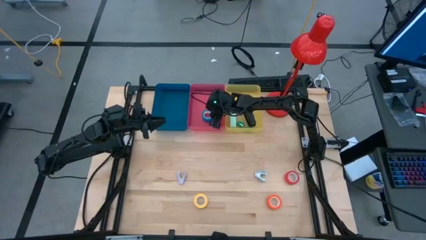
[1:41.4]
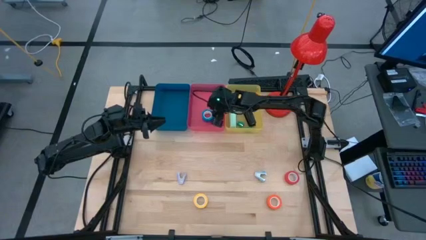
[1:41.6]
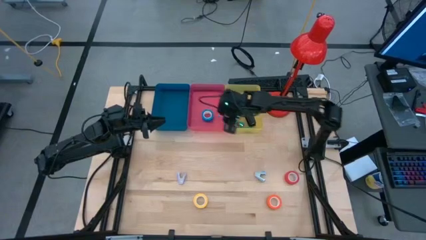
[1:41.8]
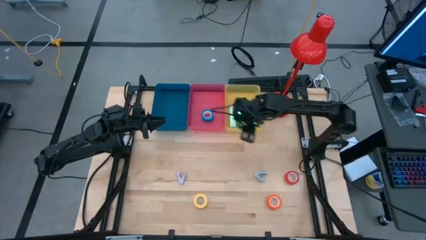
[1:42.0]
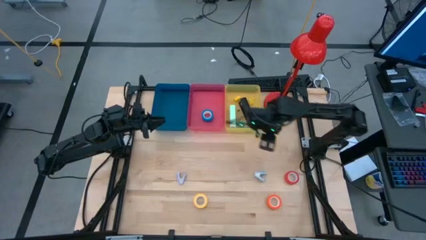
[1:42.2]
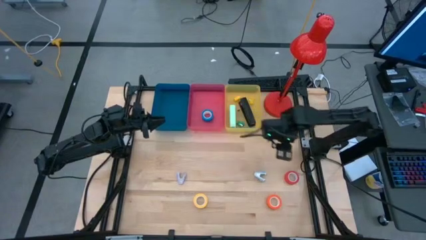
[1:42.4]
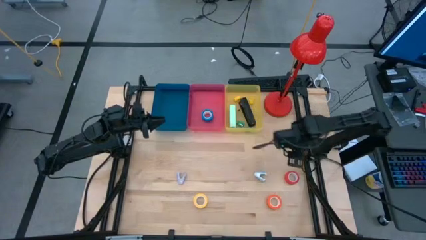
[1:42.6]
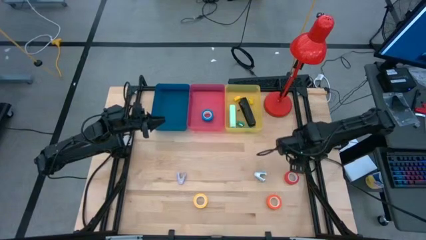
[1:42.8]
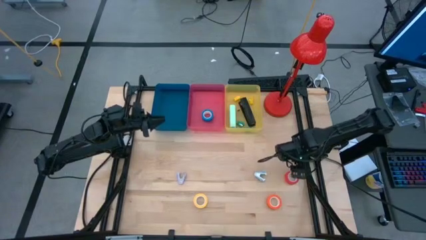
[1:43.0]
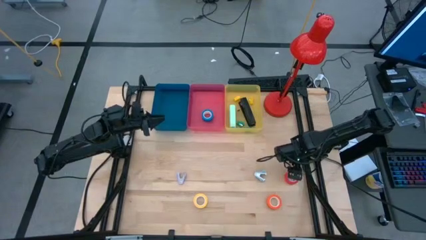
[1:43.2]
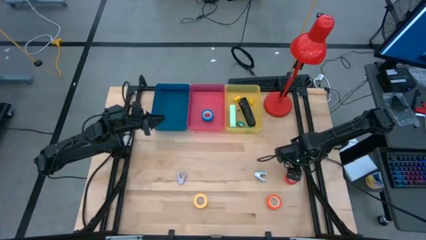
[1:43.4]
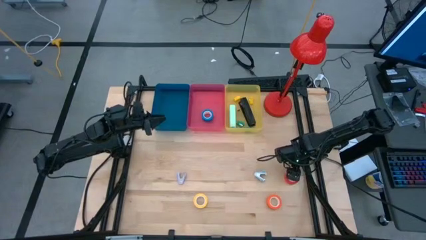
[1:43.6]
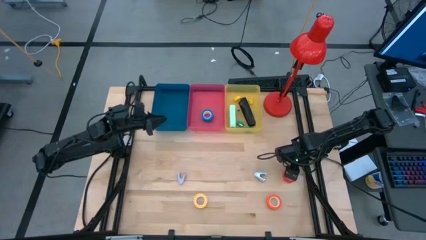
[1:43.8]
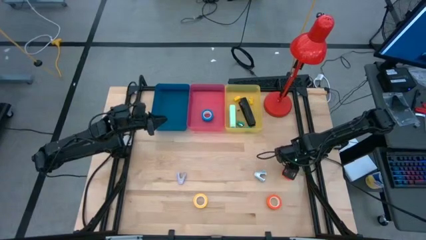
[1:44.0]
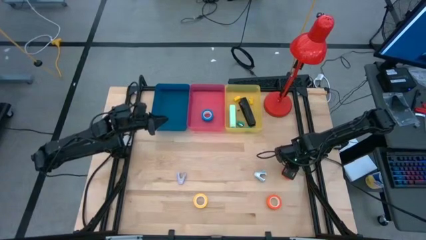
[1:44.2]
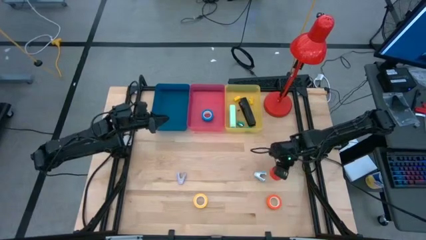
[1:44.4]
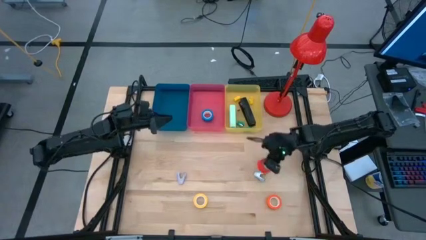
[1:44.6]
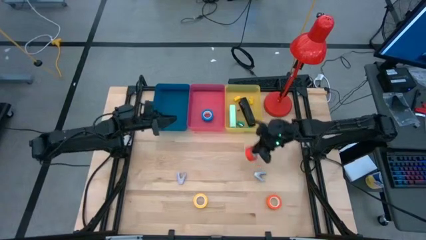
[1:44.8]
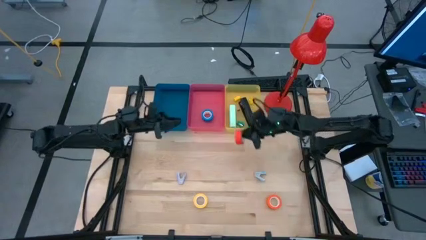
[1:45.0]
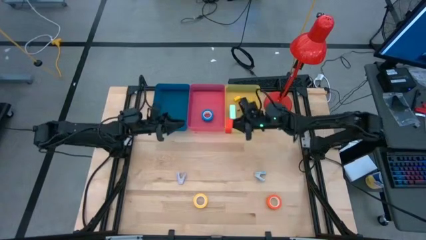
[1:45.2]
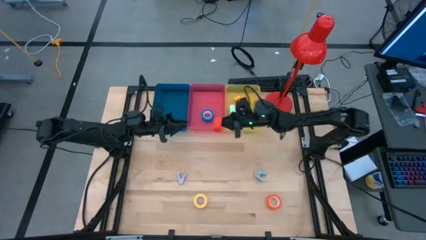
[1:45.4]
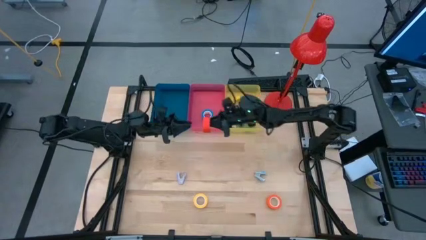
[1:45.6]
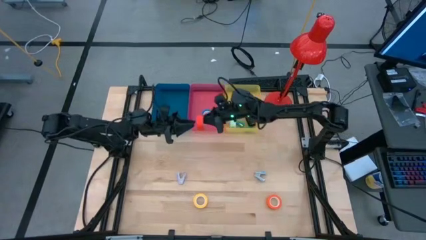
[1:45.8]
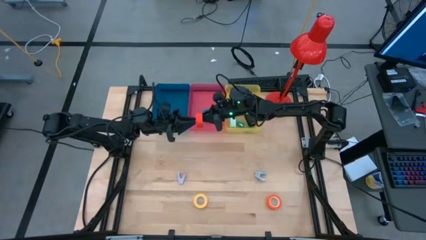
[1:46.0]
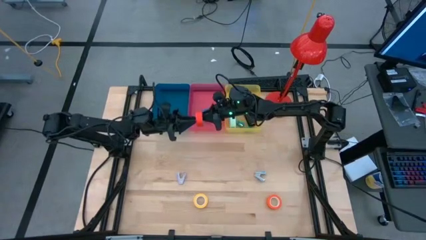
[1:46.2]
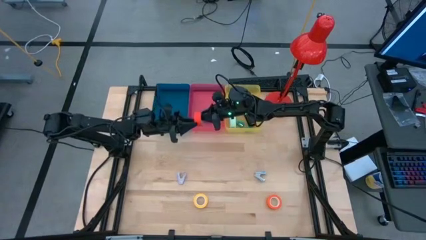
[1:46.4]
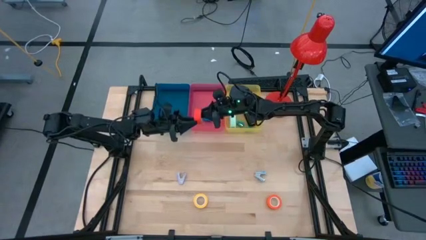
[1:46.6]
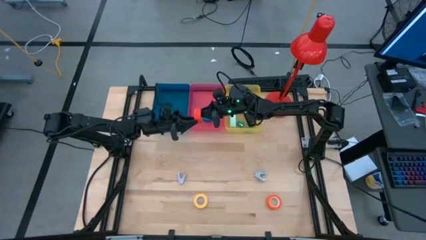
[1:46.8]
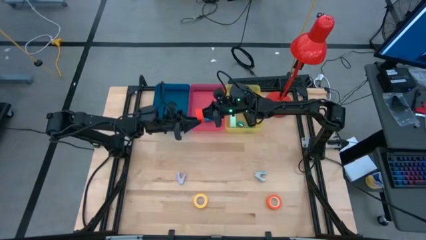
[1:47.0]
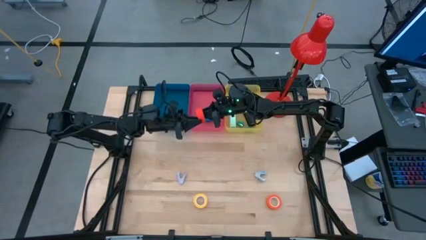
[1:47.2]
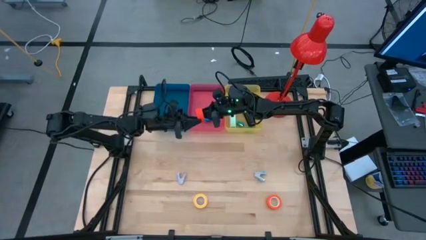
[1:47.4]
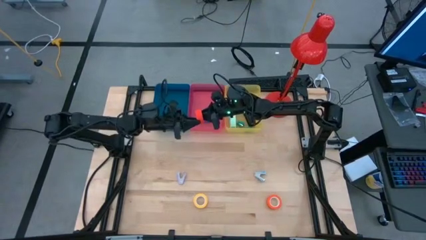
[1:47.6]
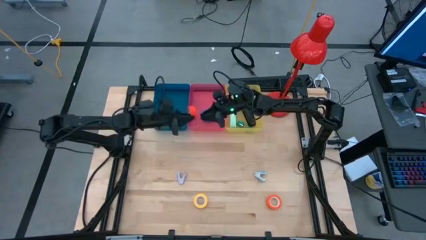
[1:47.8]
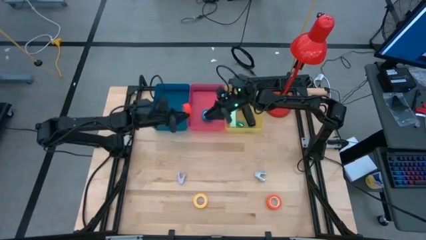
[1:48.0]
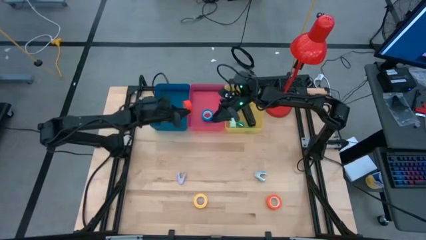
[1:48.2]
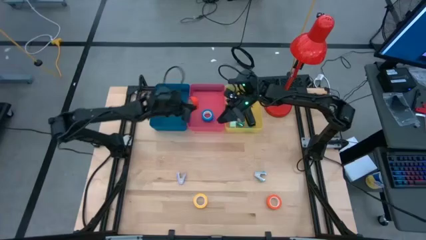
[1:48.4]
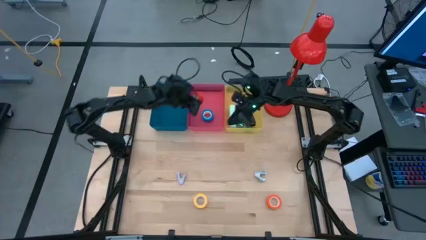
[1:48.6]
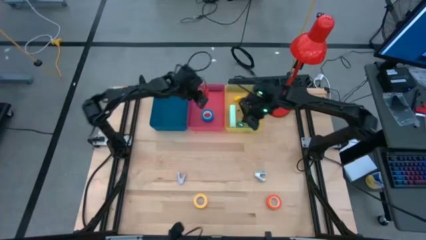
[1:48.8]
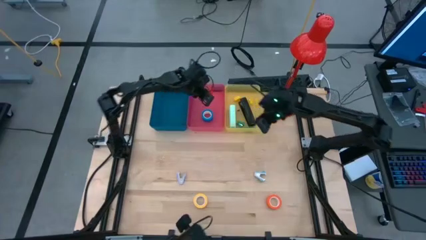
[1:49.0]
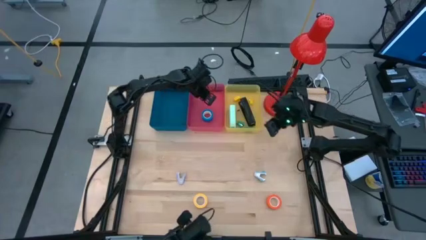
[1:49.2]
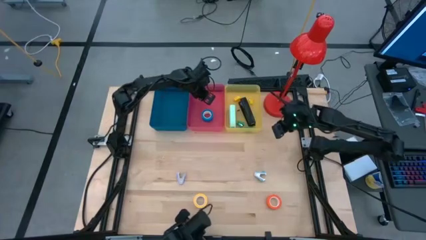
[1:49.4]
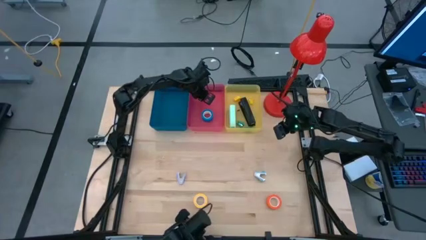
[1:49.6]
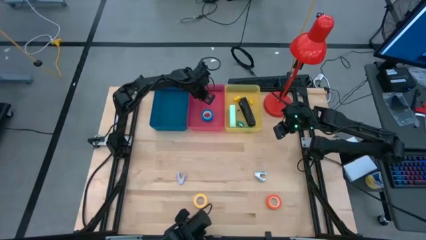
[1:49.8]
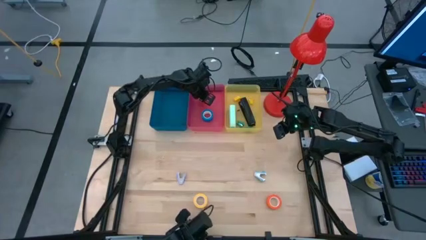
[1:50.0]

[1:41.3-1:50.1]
Task: Pick and place Stapler, Stapler remover, tape
Put the red tape into the red bin

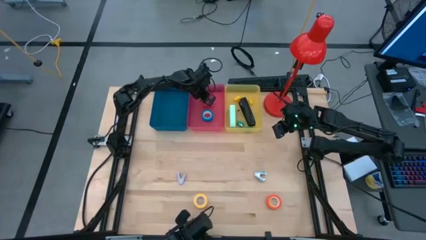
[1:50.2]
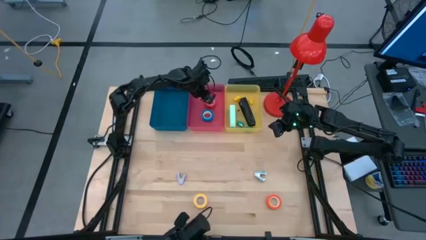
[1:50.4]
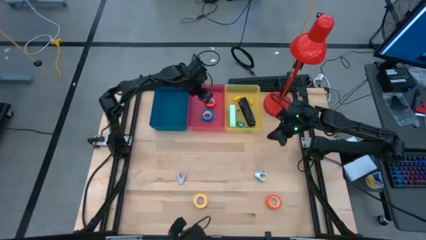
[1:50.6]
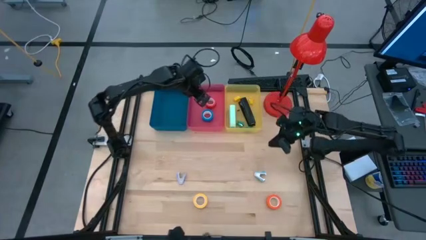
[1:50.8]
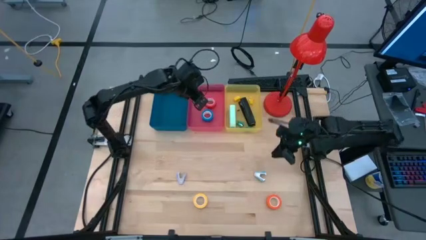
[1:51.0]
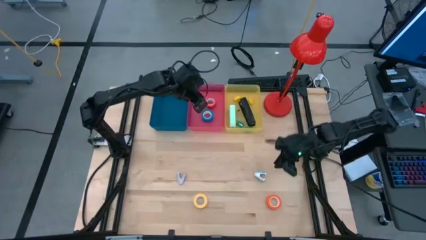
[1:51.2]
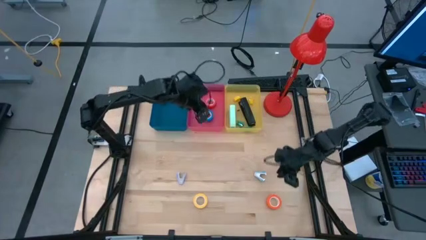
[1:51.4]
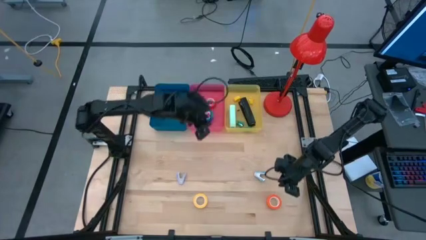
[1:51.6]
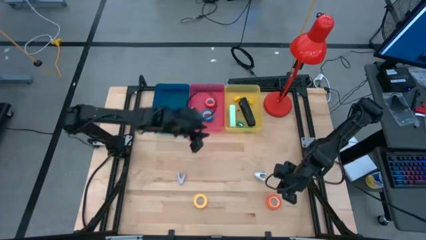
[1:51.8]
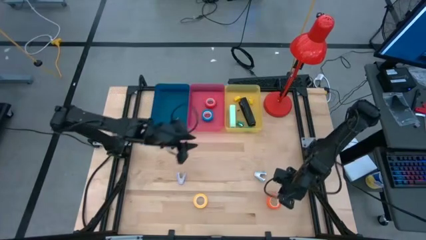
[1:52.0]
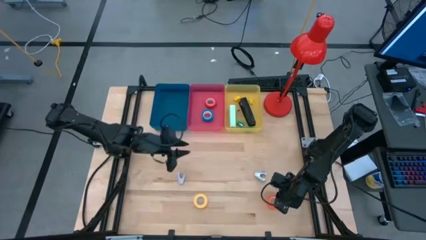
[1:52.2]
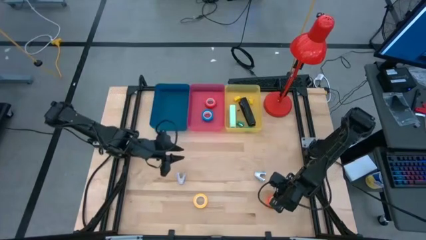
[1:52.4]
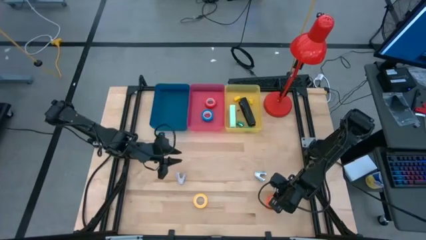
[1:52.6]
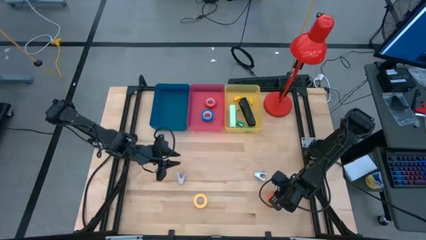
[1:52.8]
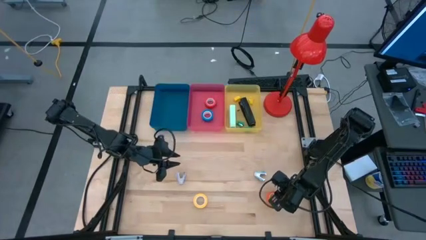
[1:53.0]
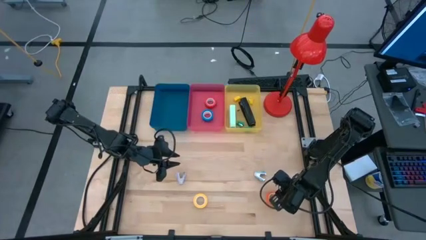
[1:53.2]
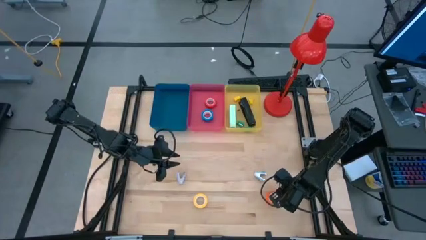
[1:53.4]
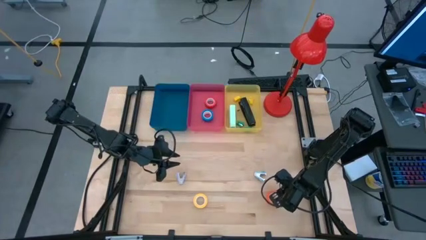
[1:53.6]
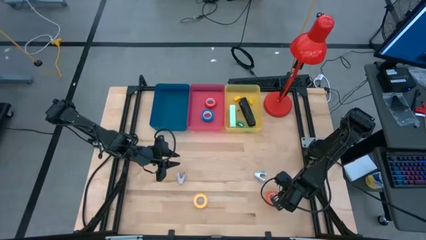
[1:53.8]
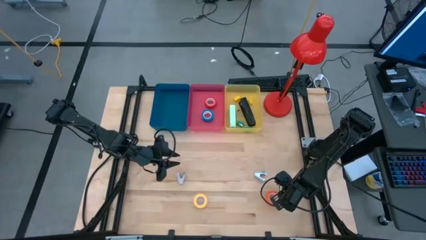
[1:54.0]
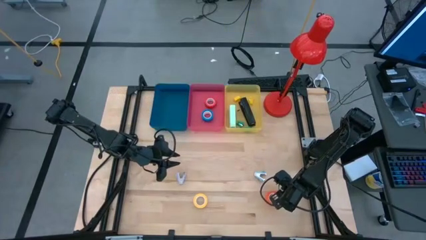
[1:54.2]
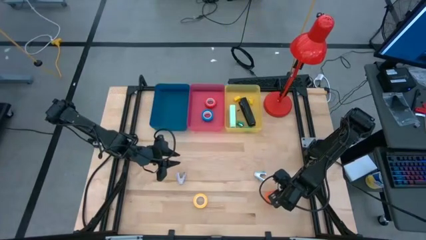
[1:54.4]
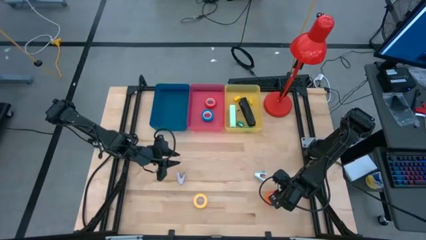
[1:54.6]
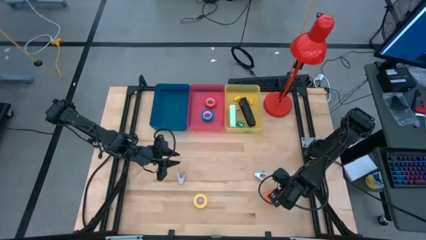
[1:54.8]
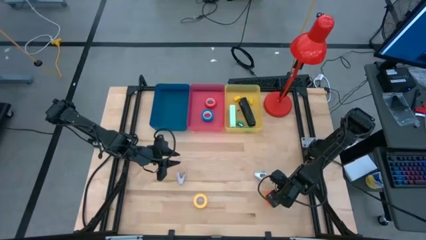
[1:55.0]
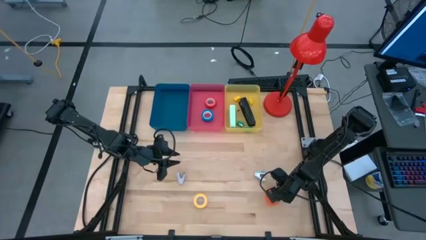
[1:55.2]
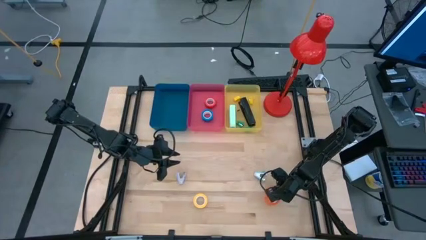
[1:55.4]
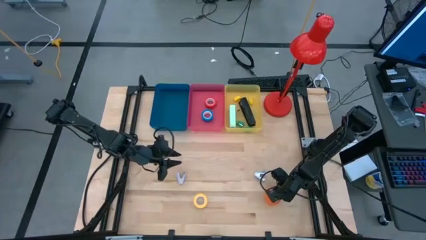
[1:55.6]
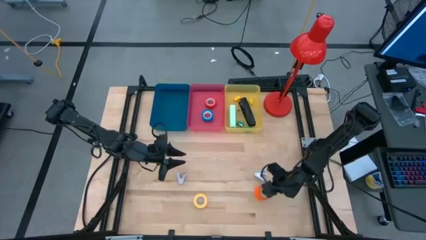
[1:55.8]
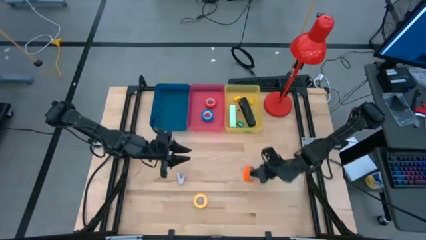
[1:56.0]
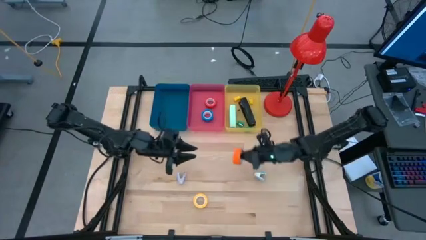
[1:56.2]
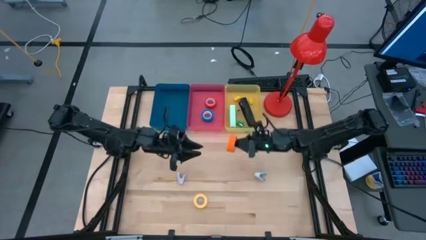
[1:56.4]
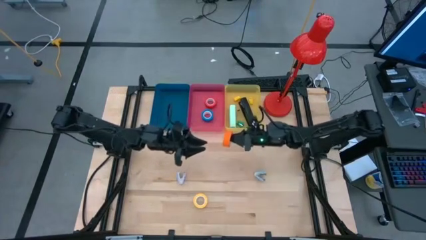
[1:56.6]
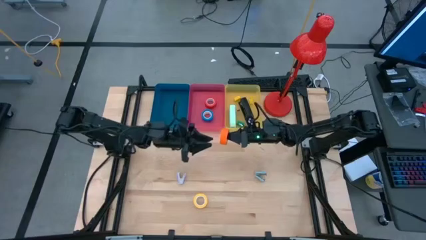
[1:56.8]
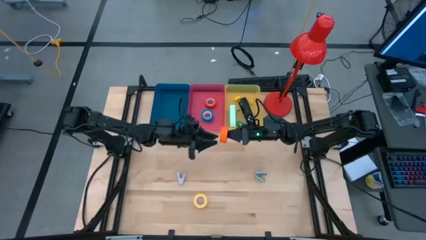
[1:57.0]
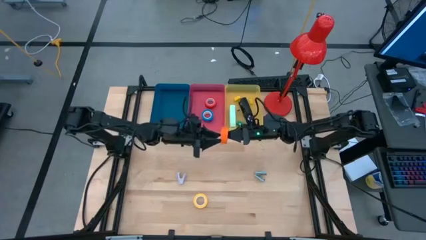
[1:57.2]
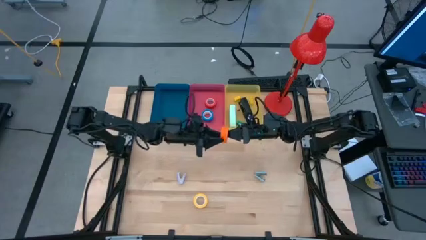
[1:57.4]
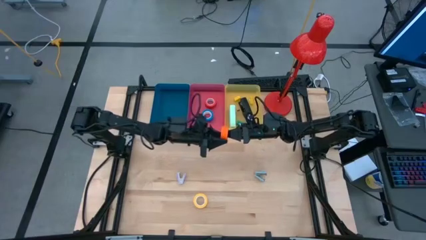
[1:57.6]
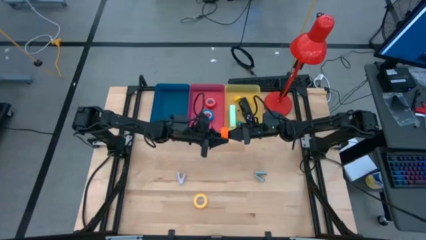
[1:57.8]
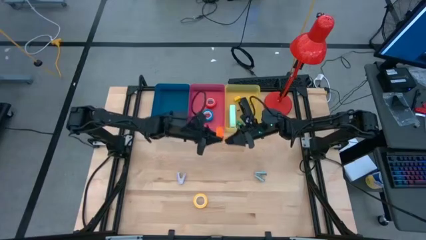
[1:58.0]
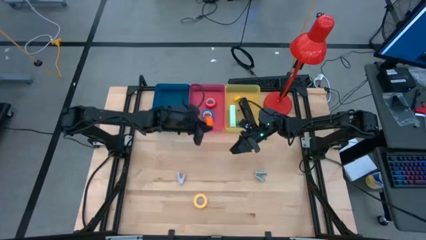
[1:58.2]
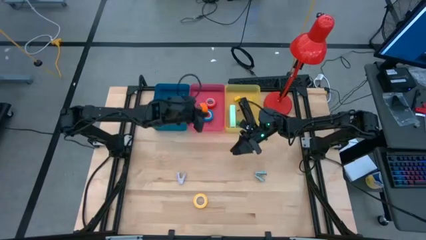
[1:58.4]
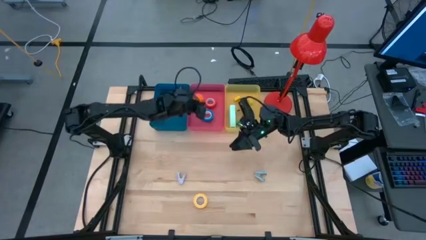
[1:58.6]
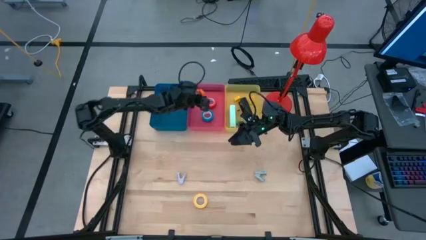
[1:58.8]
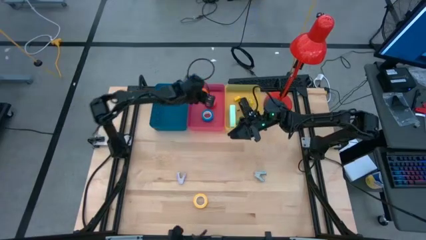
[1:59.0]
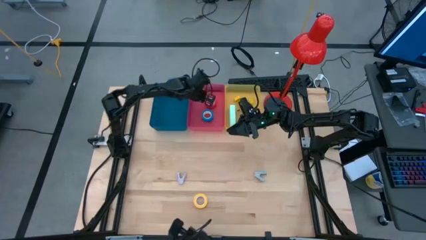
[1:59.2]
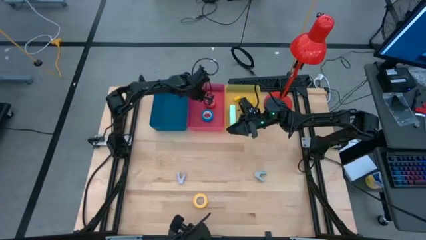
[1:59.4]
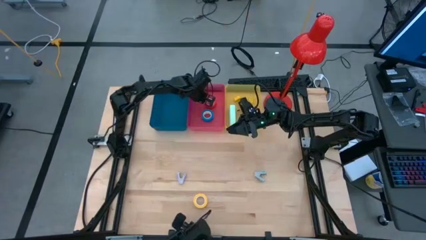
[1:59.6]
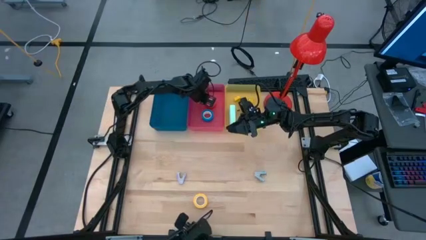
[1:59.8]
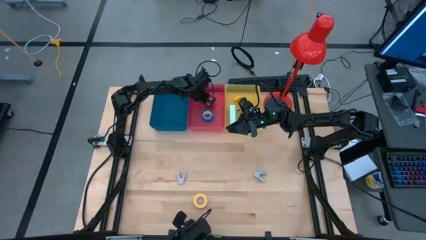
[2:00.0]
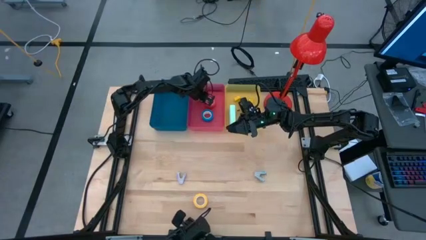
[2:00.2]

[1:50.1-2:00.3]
Put the orange tape into the red bin
